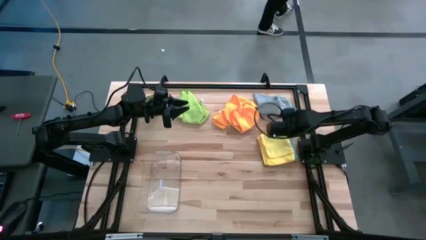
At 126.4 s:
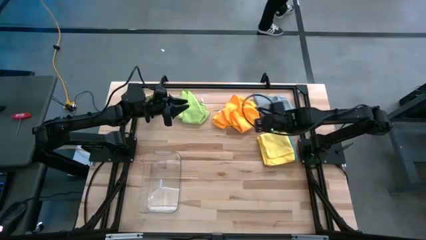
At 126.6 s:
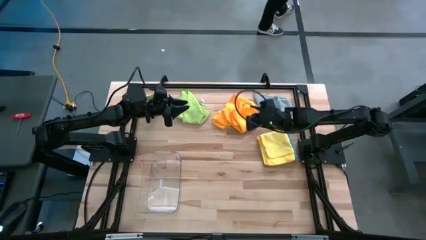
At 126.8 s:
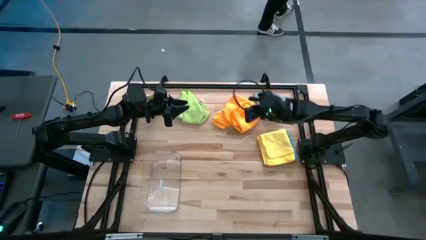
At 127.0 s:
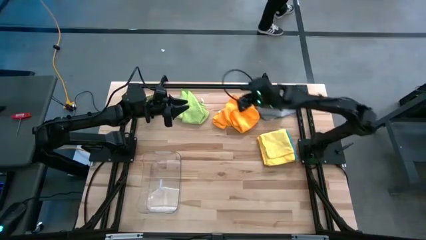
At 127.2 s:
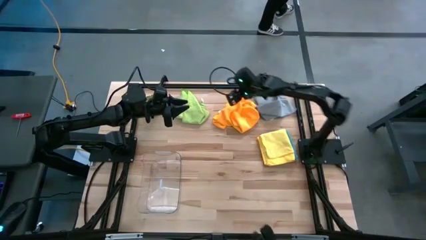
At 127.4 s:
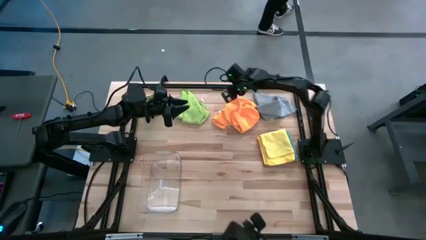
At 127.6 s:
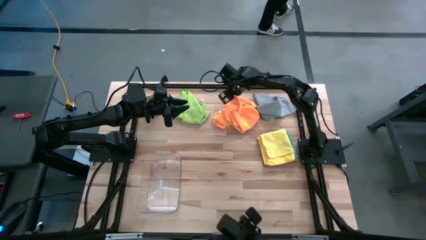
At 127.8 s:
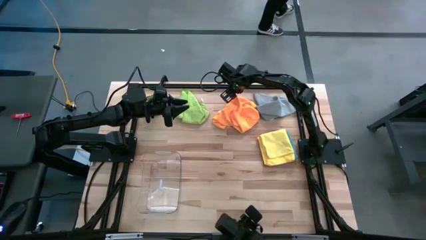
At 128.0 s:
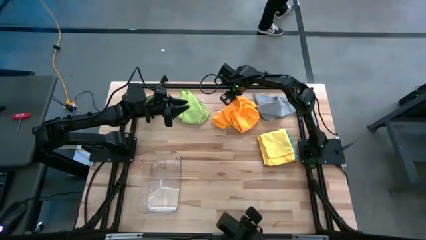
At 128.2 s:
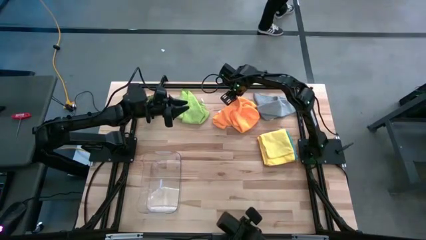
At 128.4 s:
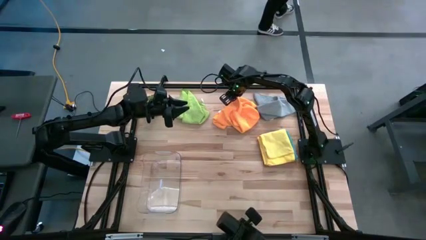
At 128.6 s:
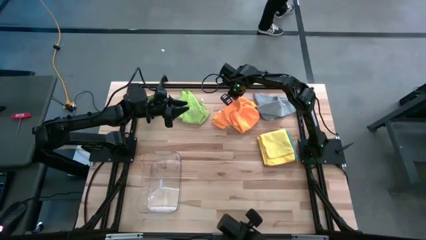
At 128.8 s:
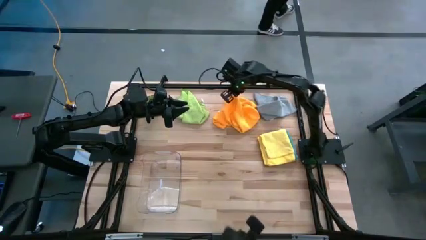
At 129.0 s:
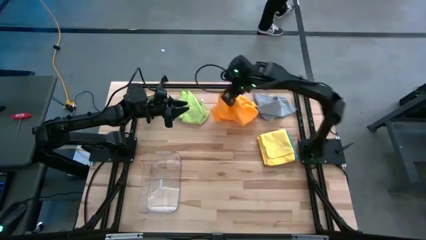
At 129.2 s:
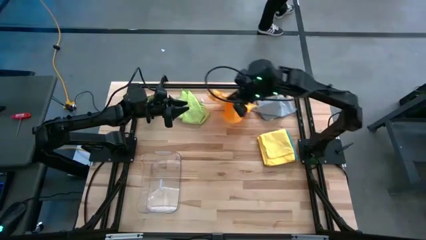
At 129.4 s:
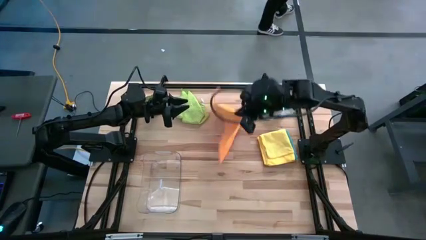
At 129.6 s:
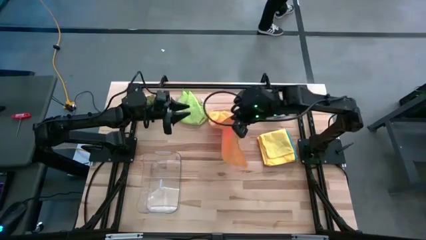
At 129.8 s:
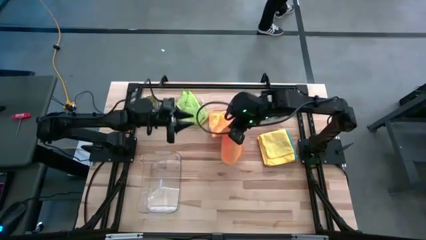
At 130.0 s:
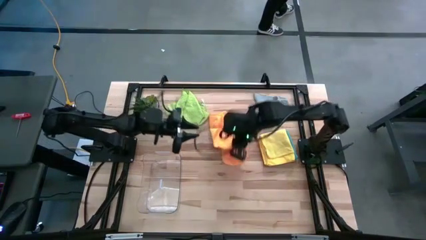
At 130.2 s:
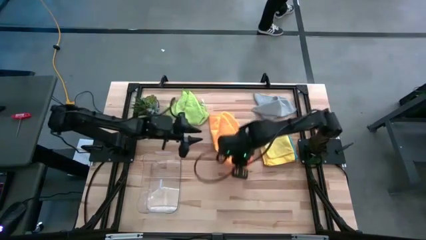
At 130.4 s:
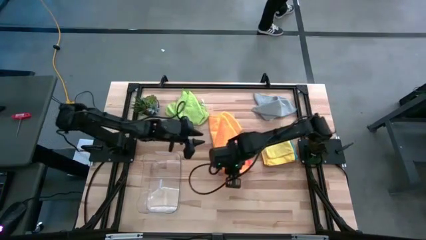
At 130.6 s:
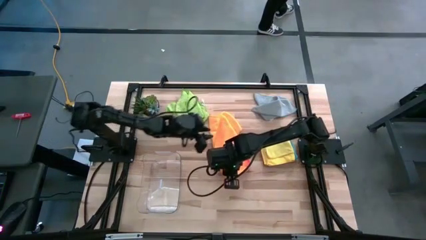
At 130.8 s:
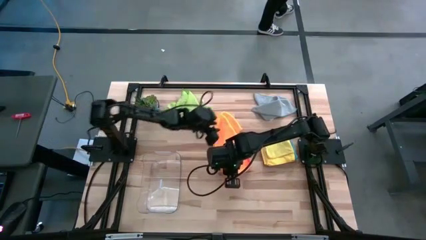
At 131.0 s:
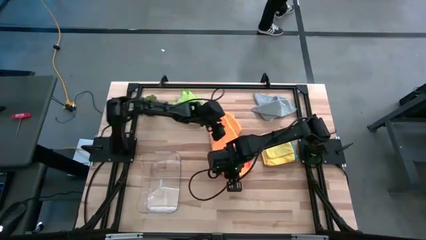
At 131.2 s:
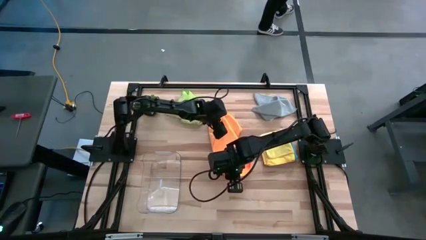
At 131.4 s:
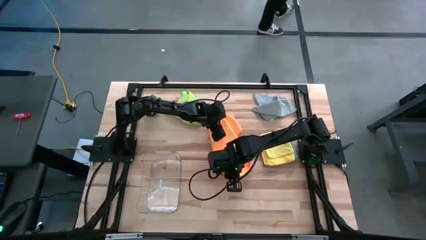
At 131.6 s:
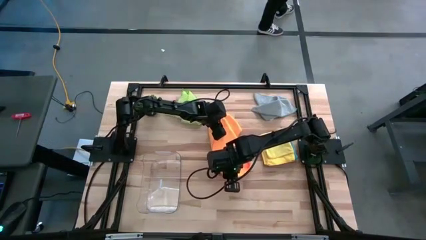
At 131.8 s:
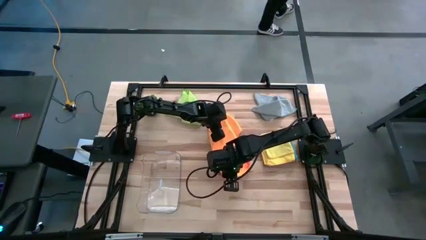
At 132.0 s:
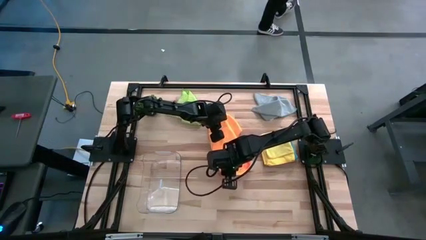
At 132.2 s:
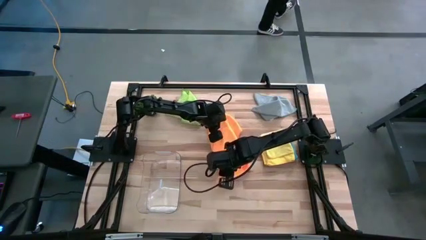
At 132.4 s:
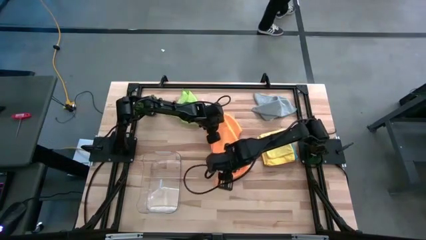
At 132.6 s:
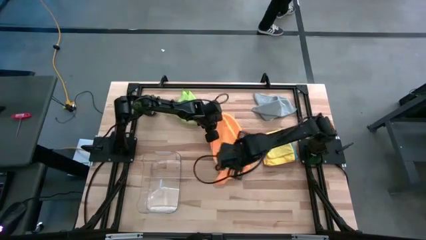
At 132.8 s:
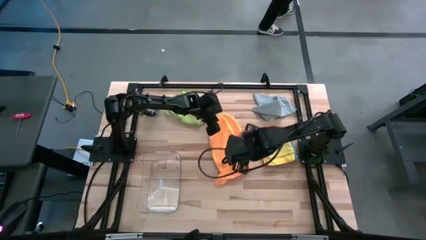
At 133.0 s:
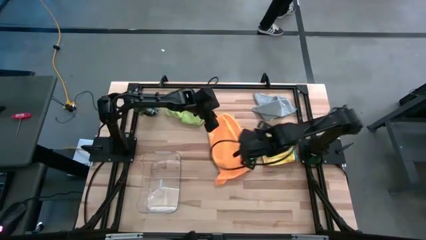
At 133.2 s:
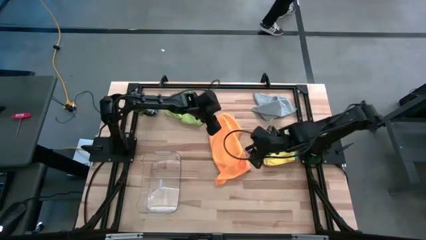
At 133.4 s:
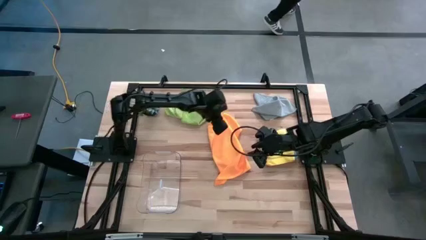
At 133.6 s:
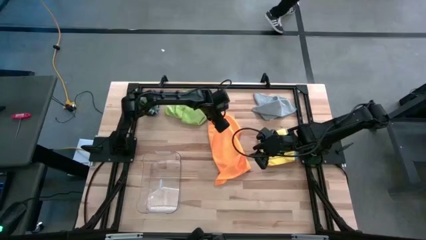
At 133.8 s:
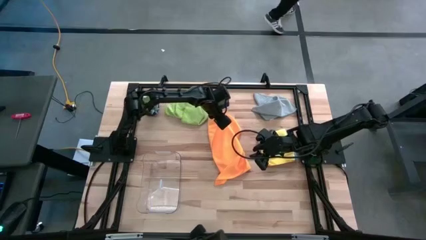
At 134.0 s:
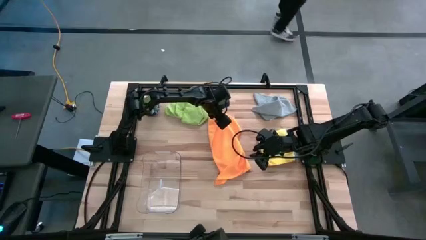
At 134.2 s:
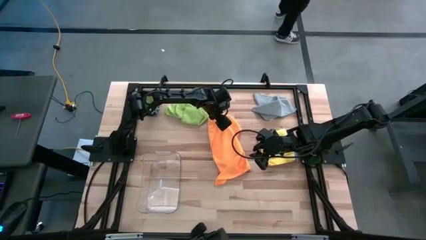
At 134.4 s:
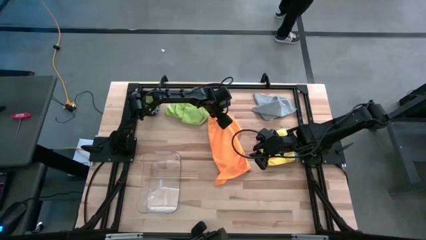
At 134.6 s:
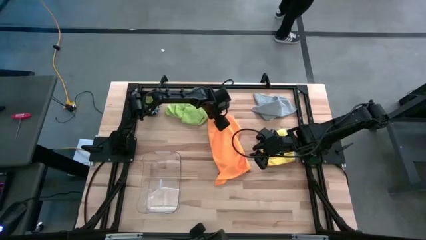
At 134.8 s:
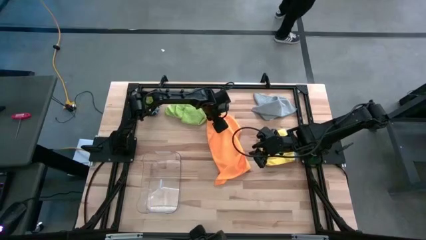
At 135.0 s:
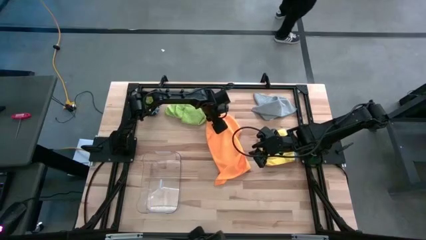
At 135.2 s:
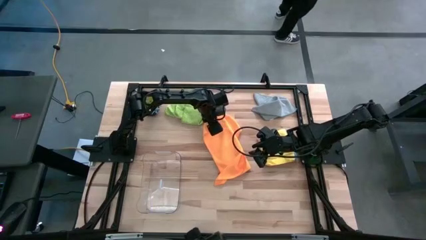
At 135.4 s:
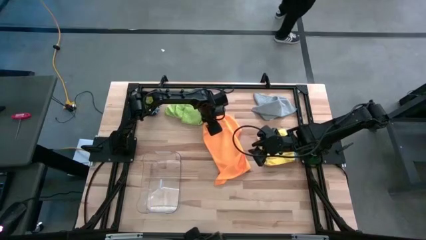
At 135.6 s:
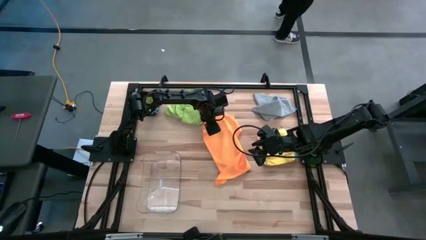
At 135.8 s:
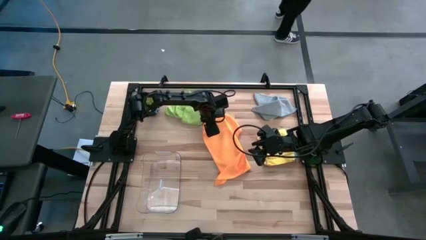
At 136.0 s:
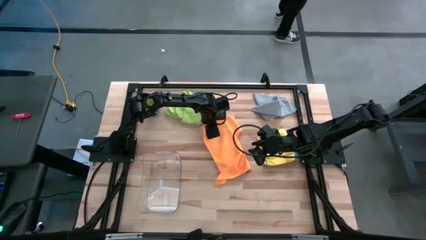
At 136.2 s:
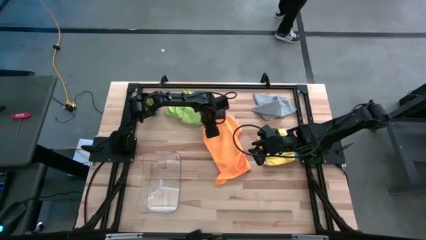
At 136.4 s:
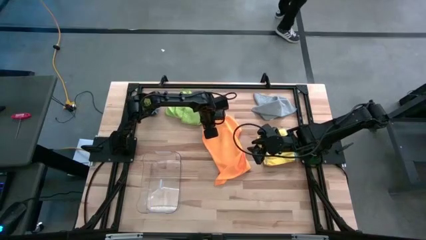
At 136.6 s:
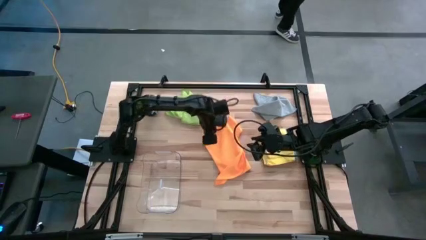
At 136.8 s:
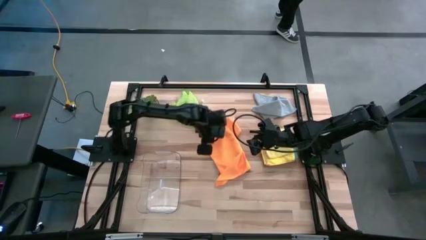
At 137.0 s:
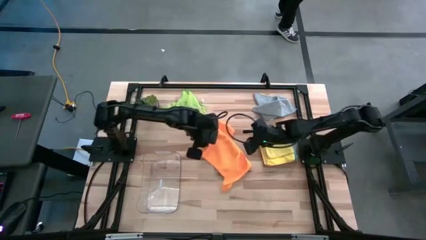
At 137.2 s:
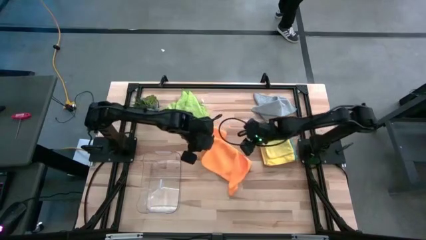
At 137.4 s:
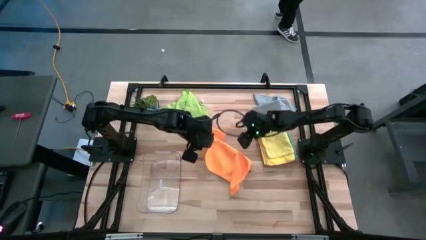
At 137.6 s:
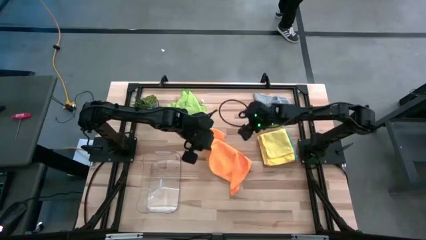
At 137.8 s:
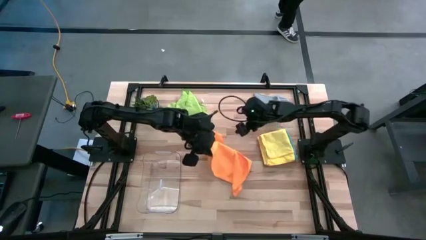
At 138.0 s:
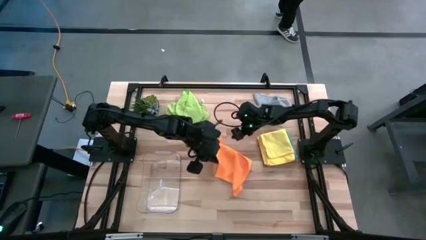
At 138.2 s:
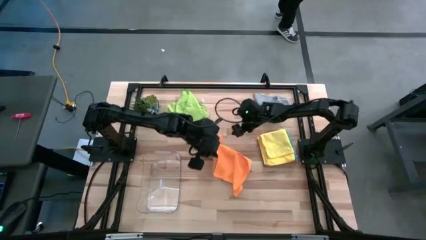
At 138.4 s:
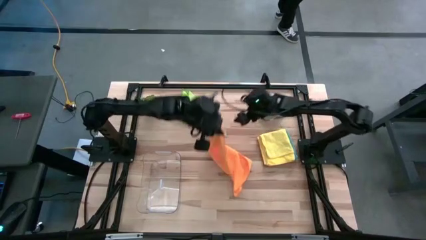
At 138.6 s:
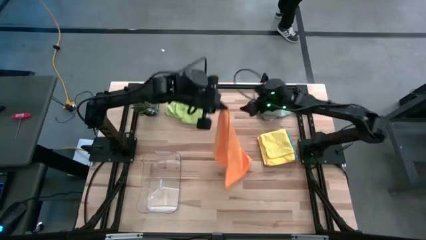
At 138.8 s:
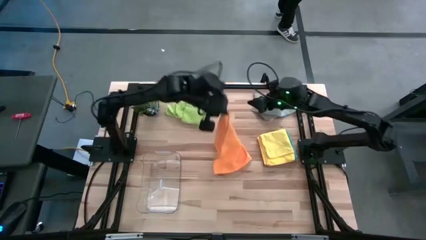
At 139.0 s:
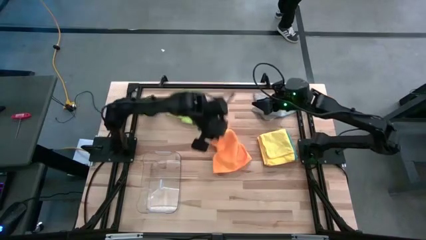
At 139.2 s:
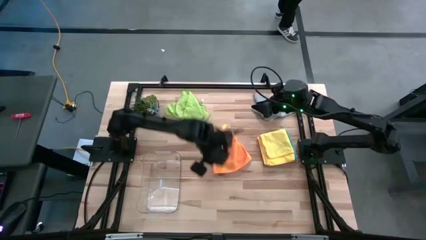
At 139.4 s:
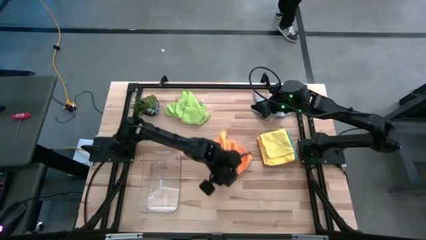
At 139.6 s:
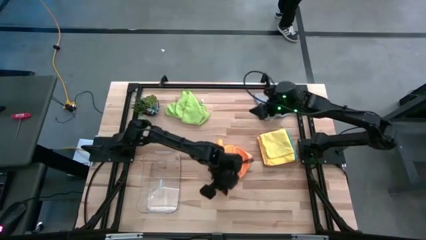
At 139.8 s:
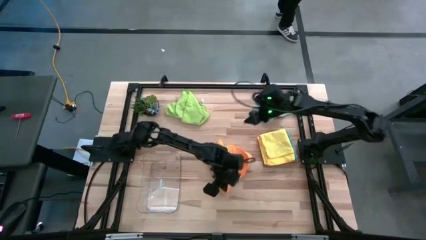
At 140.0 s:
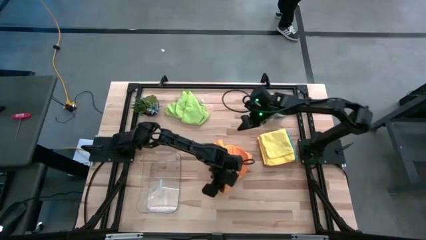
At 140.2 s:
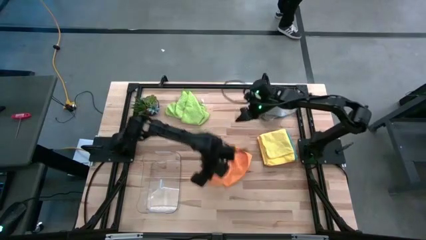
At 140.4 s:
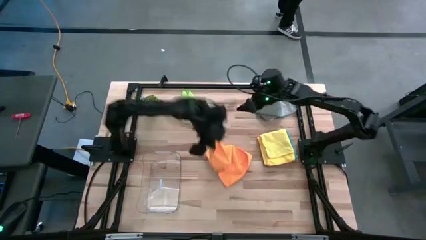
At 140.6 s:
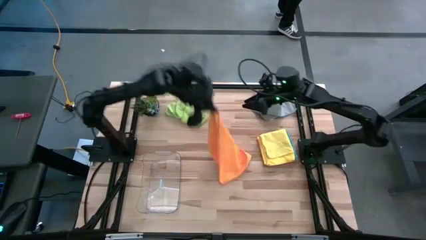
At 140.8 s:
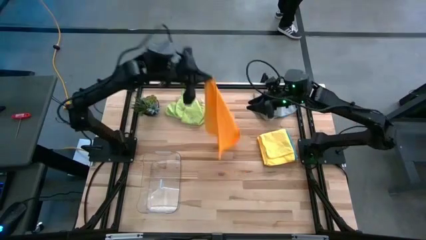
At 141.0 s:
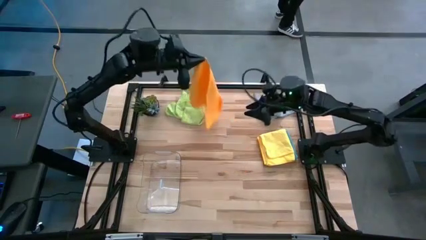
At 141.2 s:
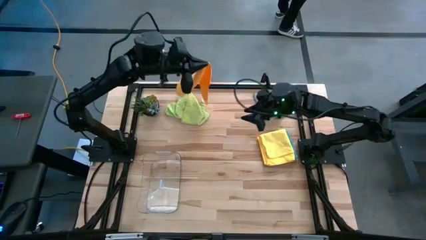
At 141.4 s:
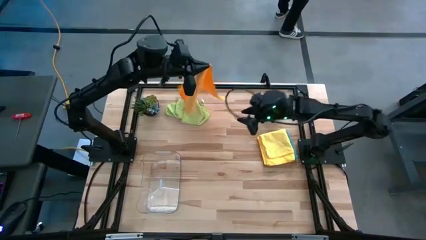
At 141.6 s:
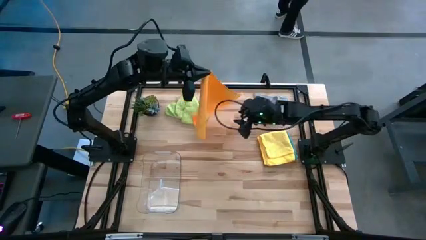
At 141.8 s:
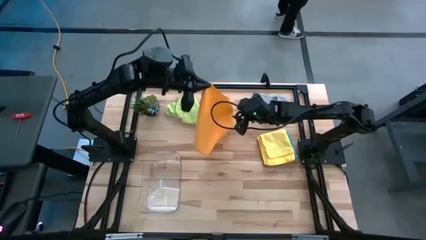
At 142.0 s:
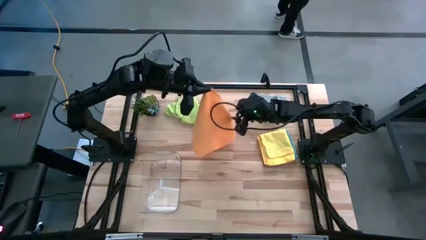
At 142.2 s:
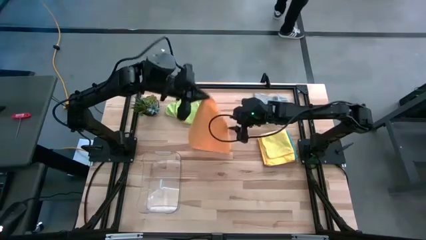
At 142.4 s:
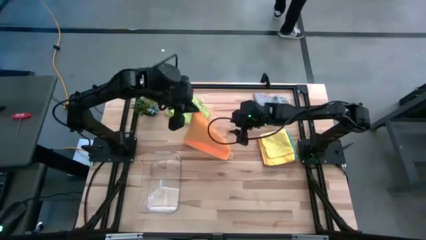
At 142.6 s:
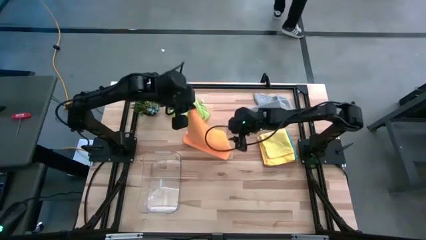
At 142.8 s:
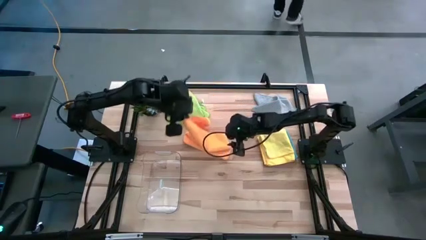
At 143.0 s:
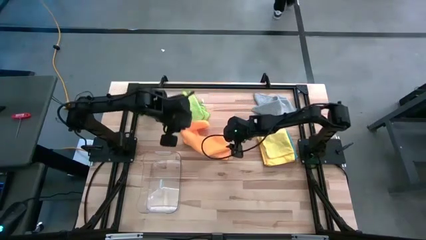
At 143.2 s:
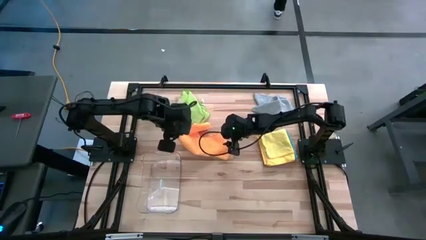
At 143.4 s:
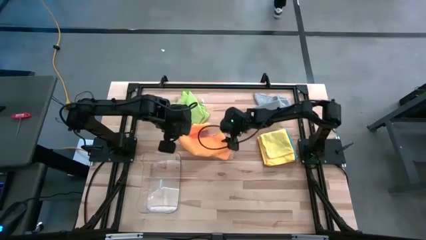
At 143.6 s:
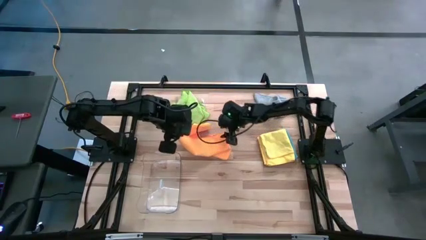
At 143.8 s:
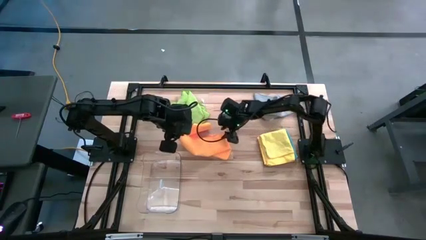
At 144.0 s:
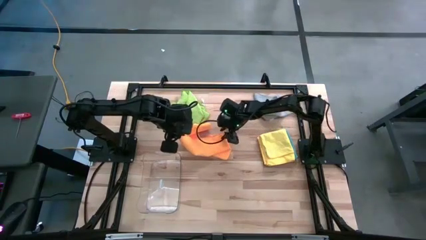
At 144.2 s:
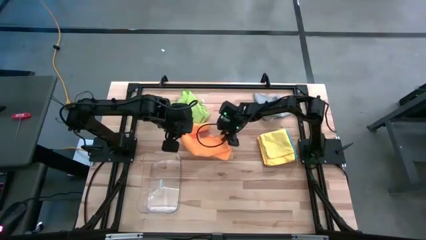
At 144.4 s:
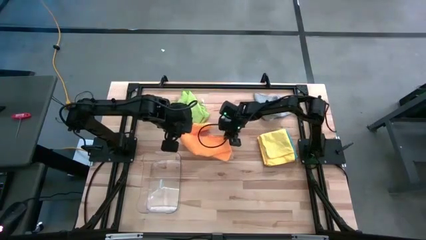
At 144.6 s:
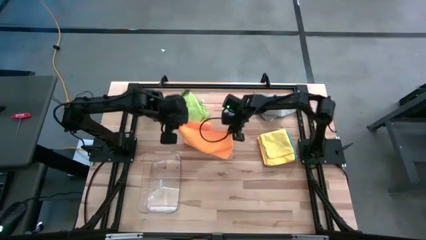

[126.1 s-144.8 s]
Task: Fold microfiber towels
Fold the orange towel
